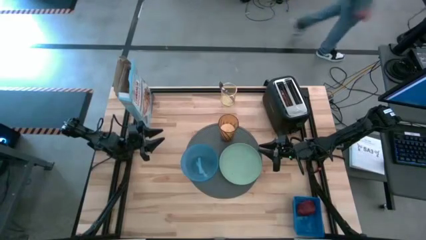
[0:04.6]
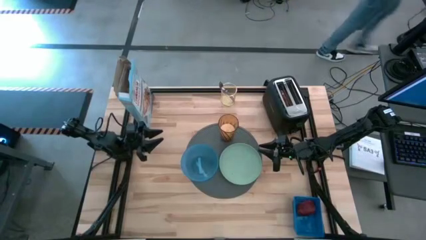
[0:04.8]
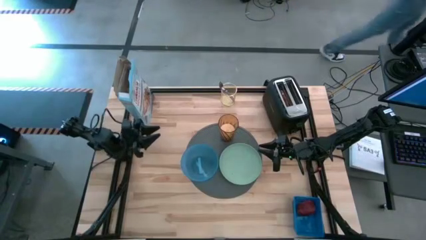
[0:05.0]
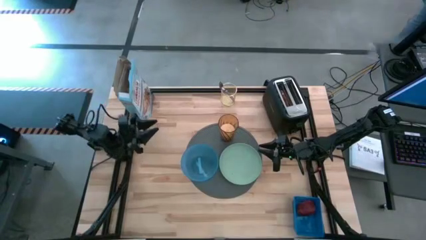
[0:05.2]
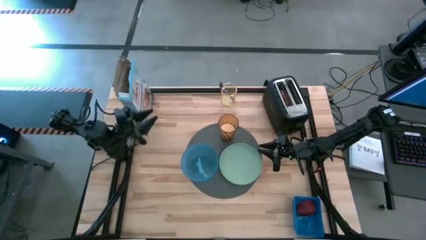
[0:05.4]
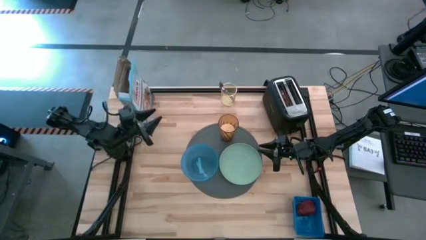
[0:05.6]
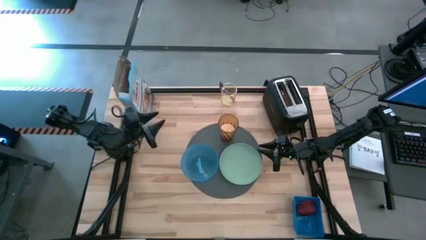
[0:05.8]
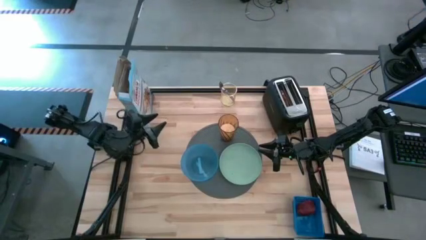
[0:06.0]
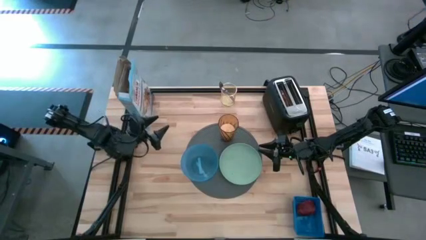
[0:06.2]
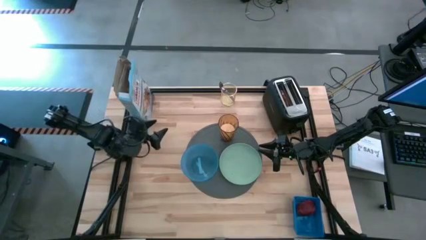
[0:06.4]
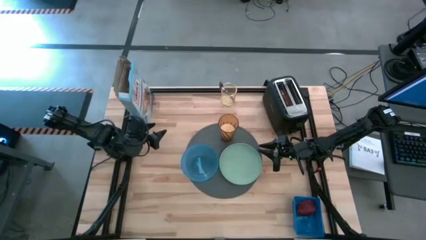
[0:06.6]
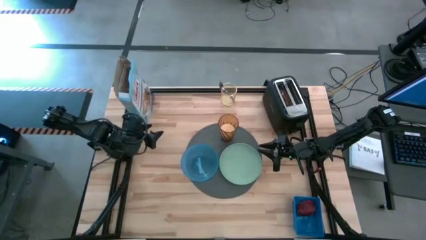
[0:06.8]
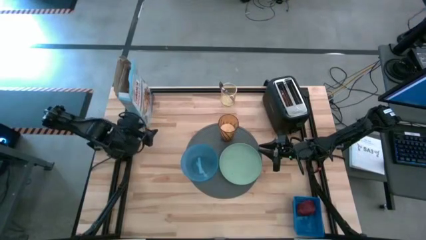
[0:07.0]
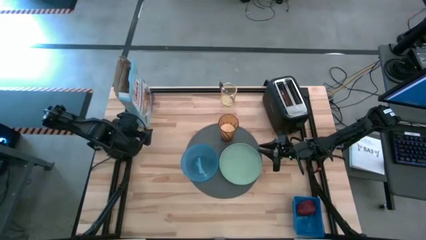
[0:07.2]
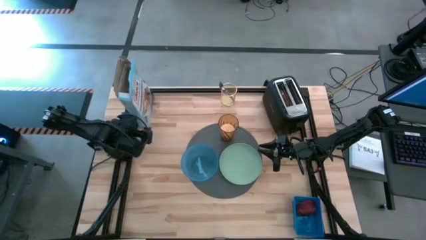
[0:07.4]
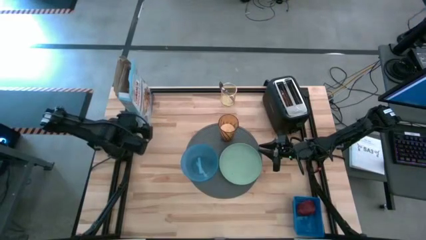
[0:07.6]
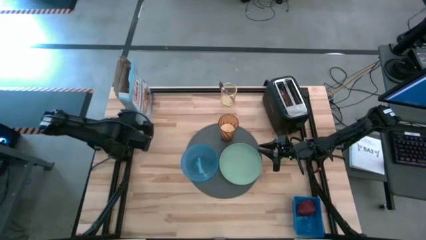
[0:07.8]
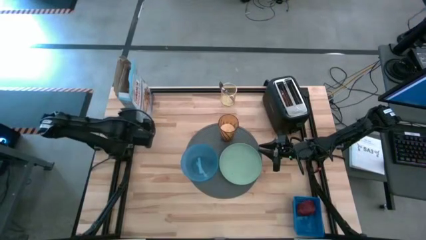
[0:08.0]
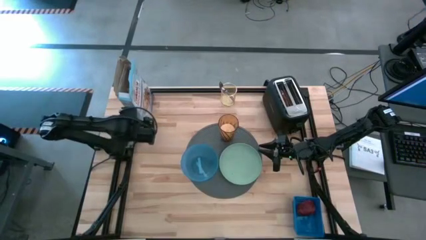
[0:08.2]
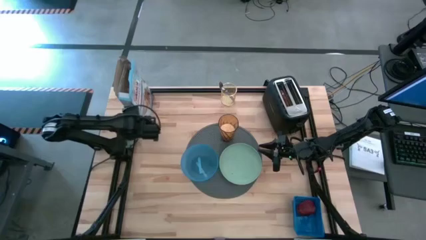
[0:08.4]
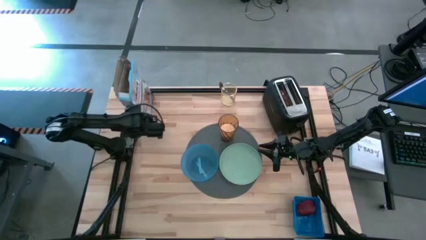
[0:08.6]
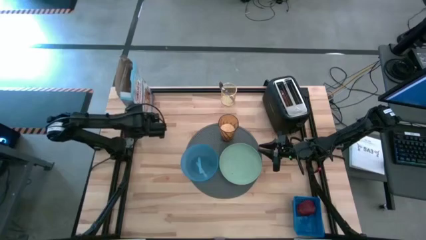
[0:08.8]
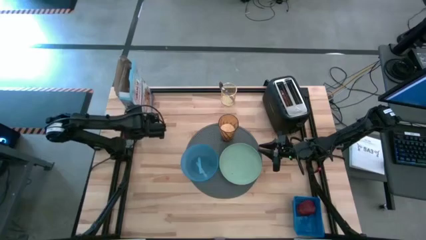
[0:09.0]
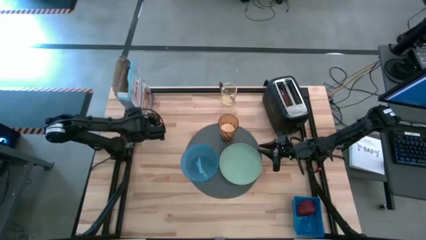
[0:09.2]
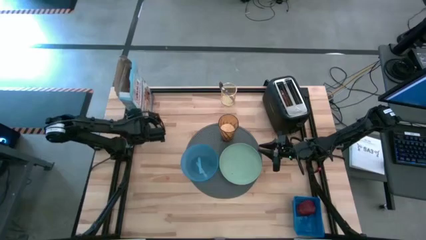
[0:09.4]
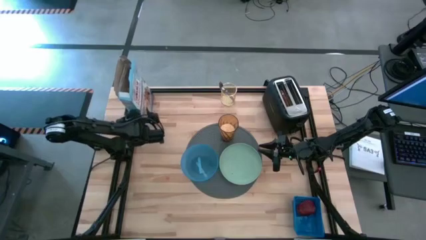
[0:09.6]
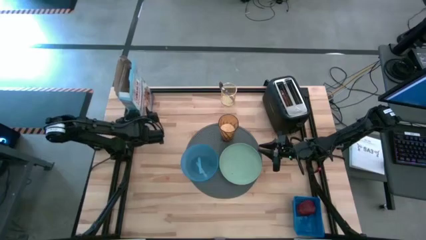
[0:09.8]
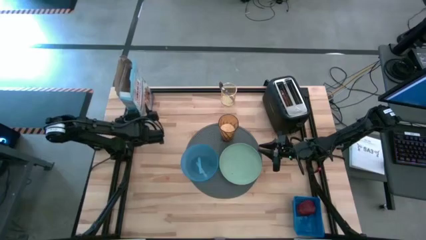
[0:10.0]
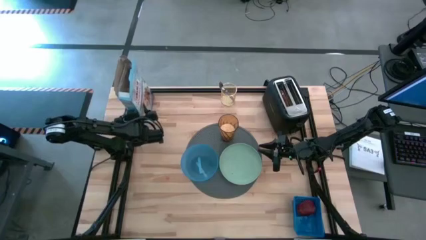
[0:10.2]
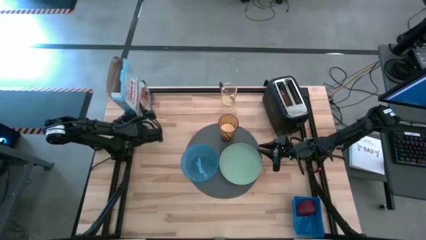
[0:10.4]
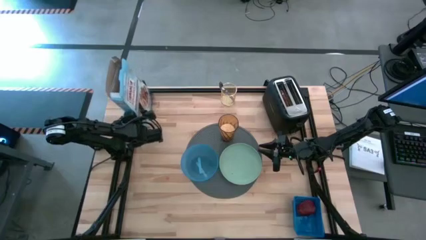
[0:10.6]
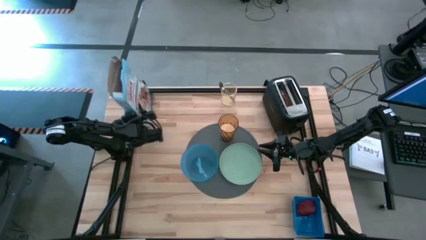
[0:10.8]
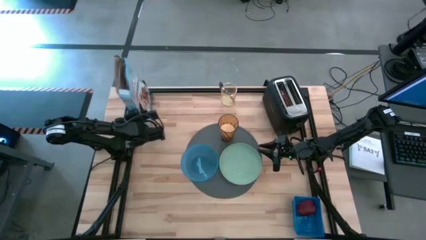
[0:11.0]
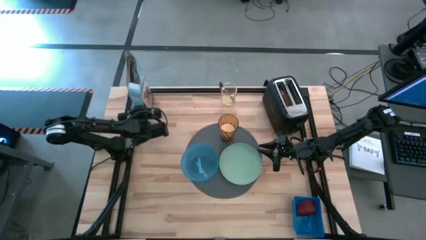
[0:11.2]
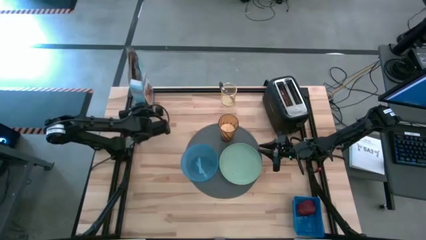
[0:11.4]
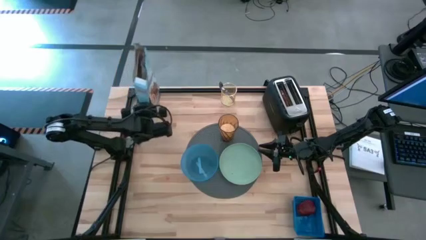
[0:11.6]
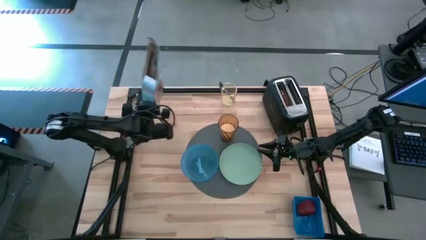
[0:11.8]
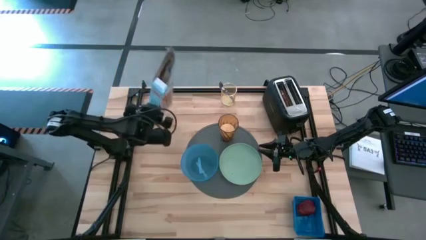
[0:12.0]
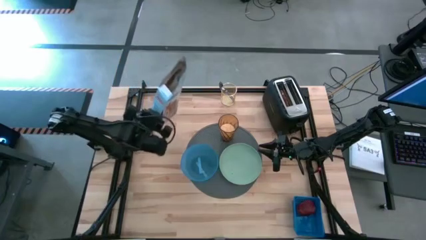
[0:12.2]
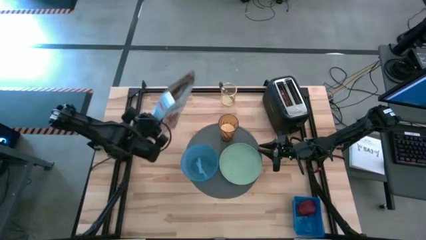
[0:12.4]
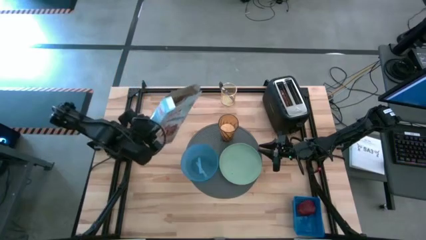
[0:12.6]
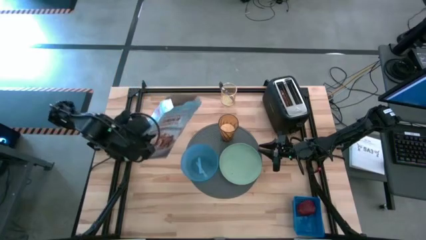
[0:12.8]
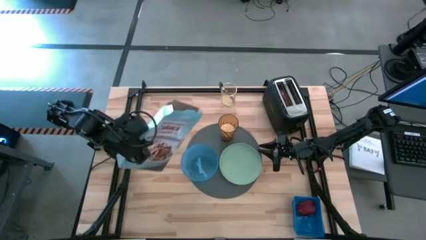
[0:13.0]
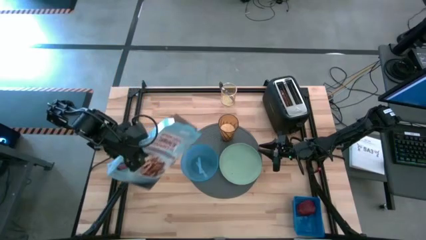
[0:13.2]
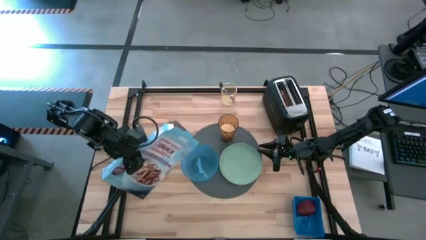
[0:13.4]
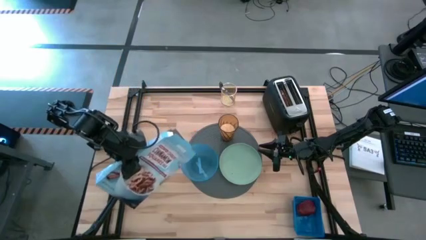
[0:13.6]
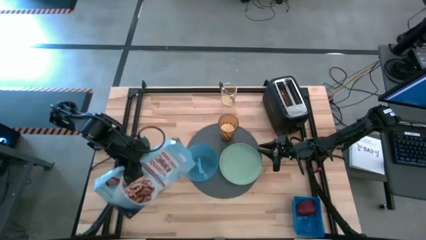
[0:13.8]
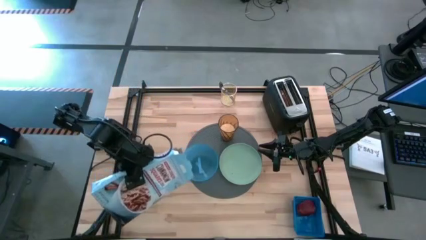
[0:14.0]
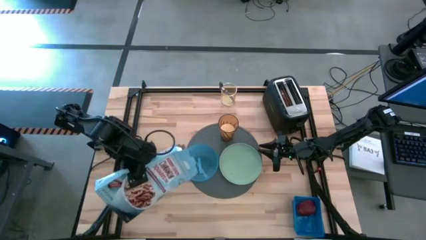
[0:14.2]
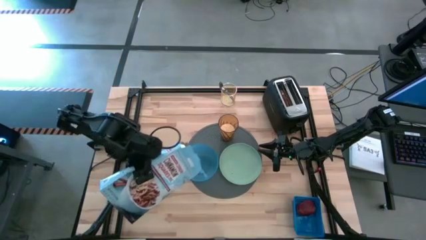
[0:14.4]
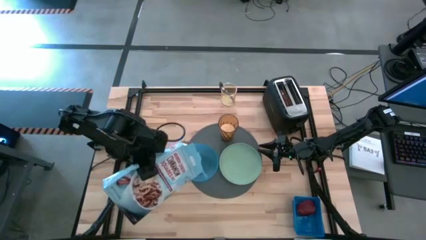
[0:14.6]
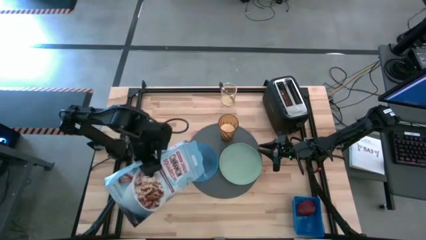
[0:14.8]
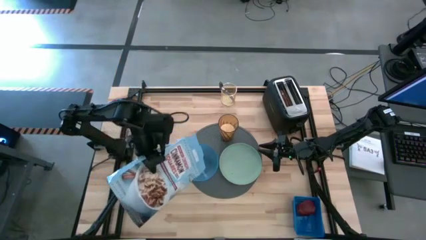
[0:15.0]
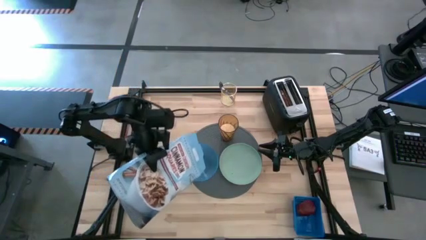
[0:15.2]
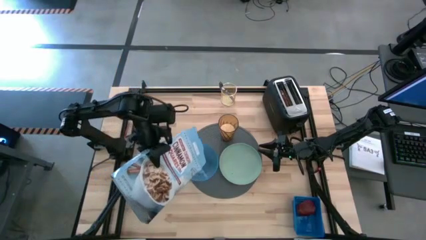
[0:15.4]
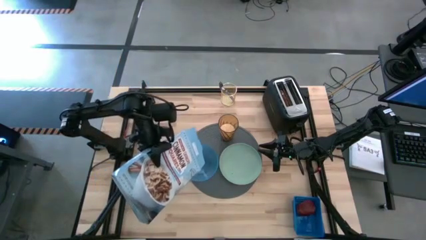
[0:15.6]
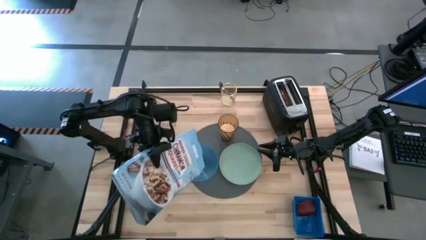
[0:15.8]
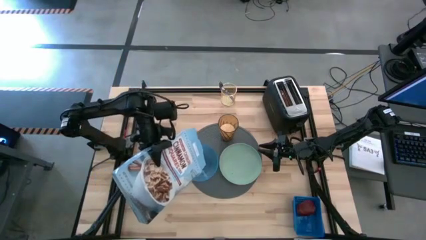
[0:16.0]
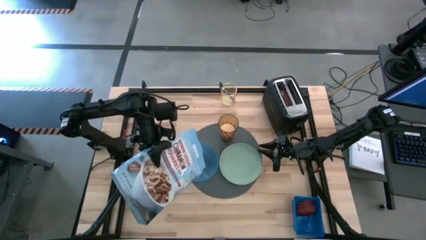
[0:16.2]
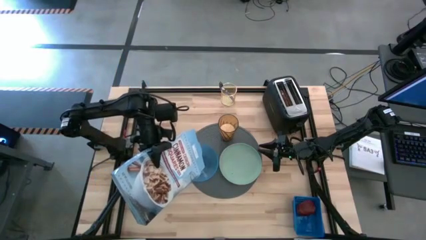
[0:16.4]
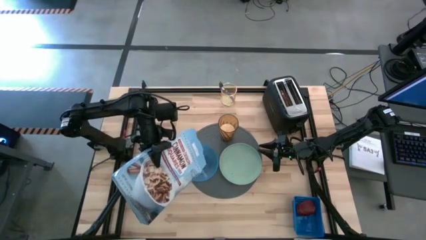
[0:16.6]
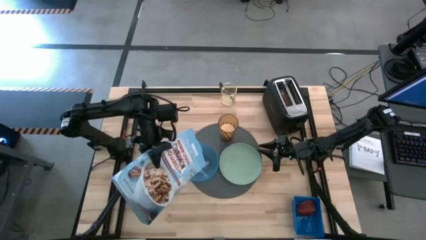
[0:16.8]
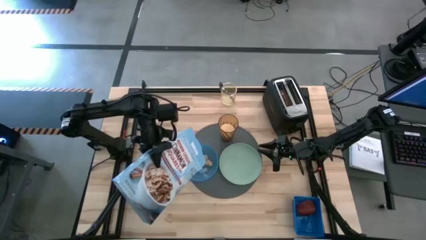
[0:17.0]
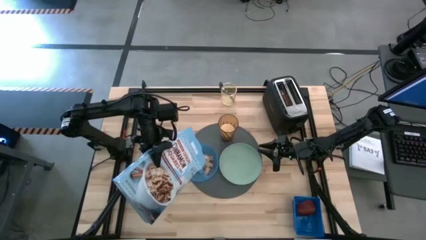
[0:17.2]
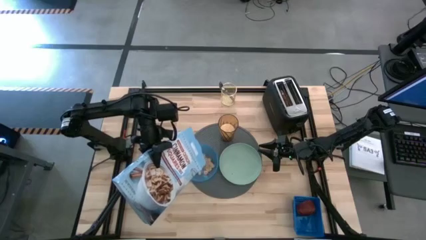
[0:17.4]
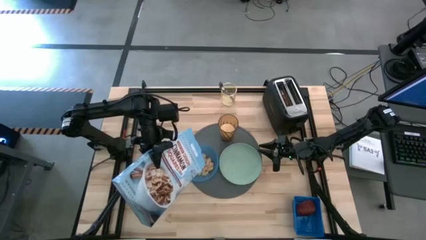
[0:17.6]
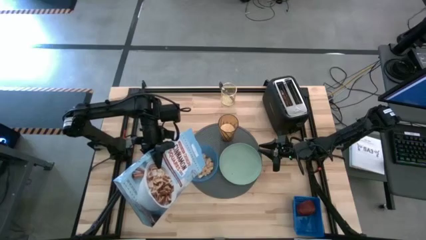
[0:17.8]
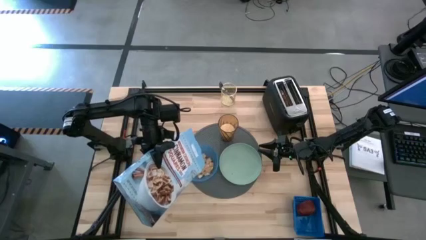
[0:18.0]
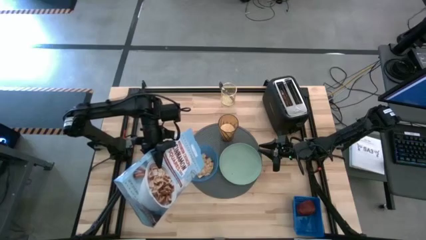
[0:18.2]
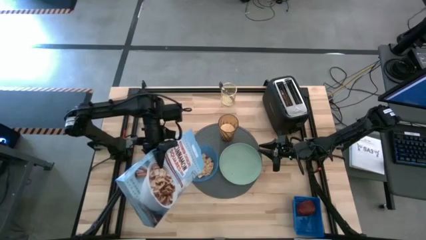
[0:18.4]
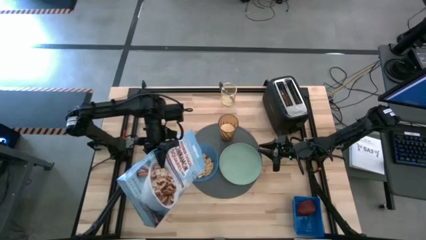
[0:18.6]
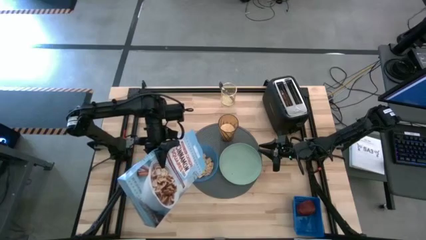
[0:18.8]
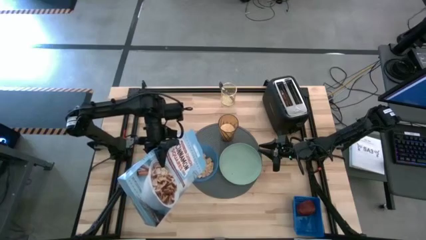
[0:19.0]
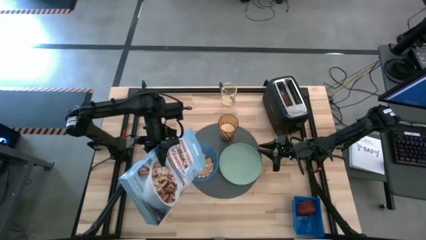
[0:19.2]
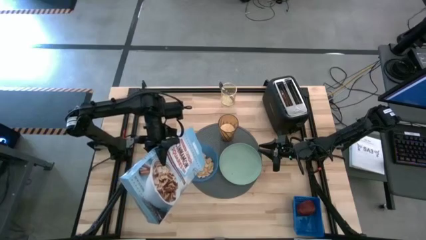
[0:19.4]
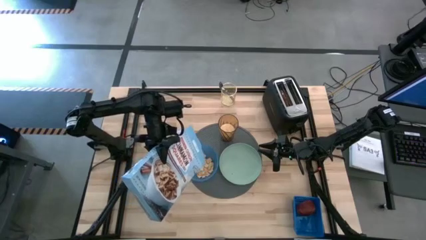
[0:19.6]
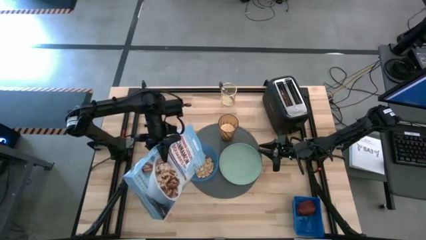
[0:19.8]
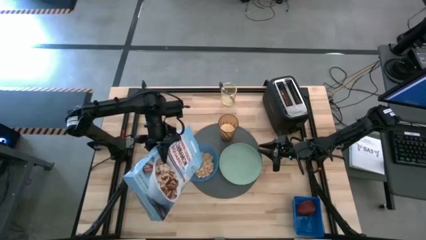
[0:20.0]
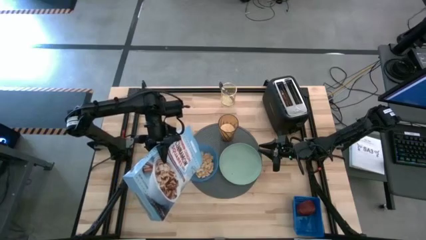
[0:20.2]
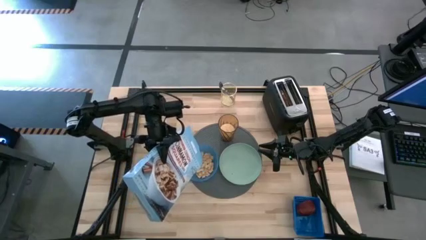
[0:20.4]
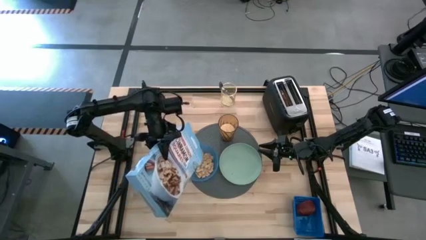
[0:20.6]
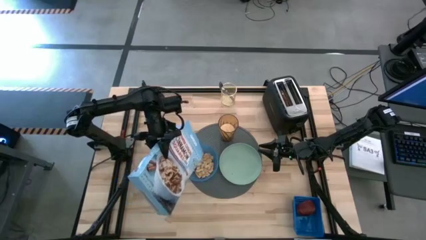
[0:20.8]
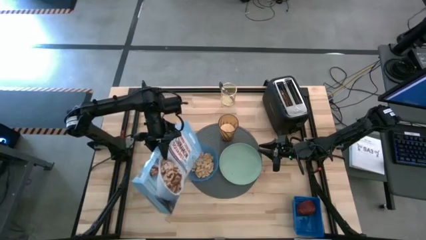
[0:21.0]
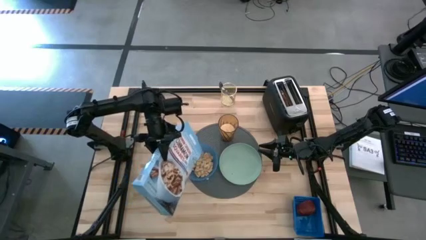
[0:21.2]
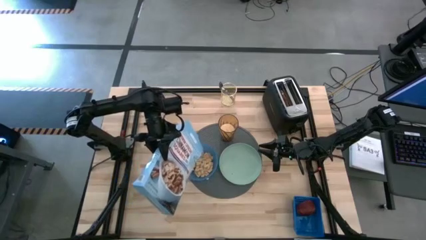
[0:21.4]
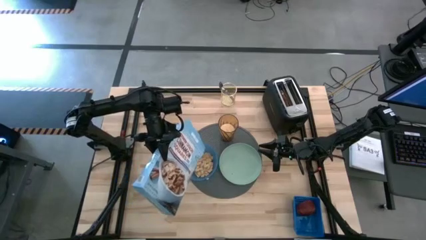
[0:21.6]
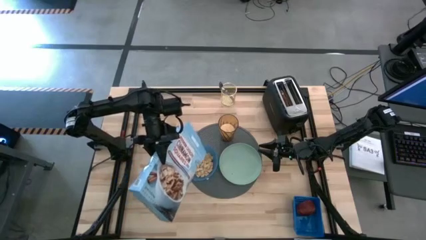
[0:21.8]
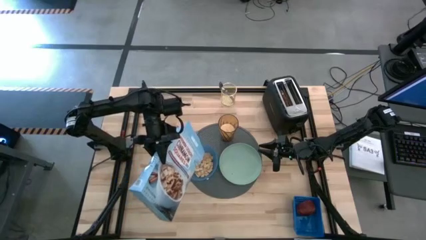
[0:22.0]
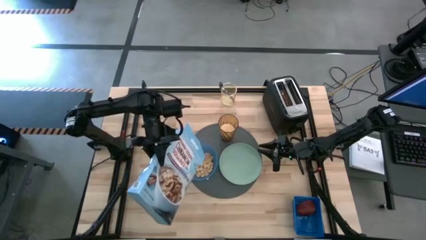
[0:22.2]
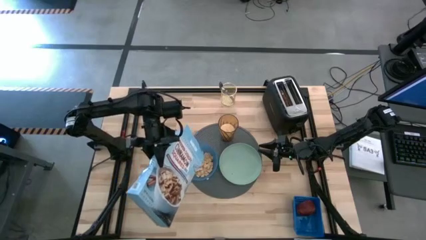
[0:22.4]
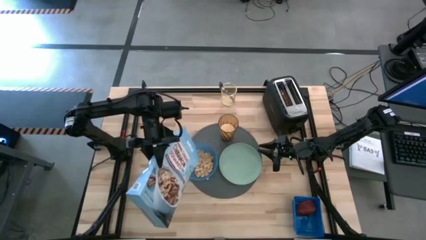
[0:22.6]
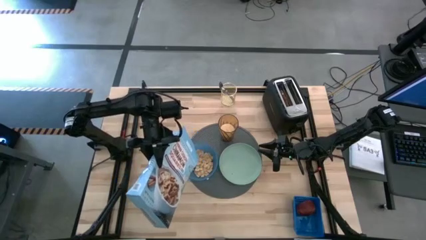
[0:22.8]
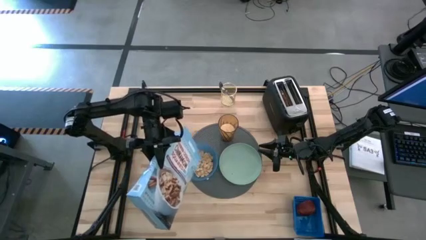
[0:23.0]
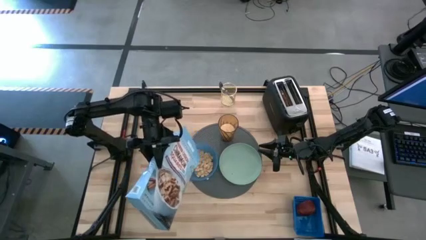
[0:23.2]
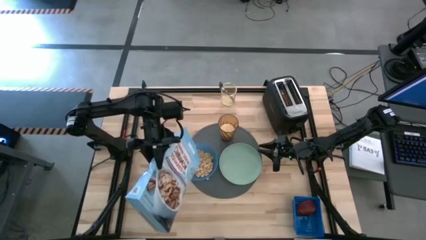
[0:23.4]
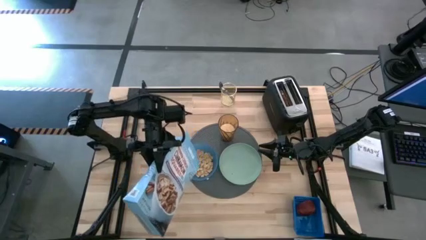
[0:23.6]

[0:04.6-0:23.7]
Task: Arrange a breakfast setting
Pour the cereal from the cereal box into the blue bowl
